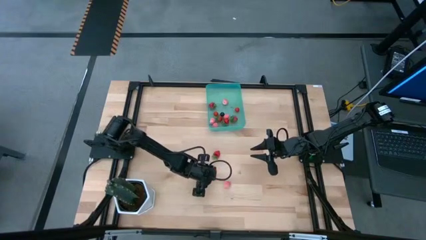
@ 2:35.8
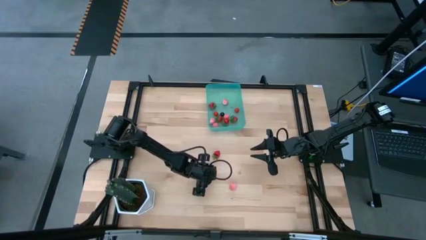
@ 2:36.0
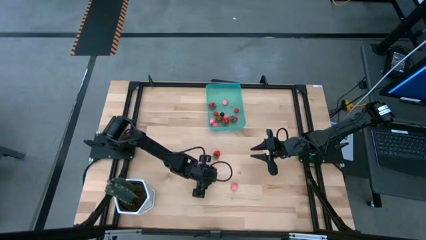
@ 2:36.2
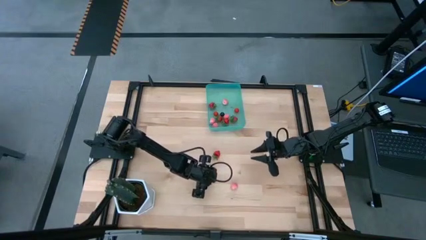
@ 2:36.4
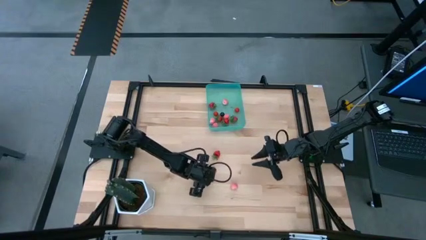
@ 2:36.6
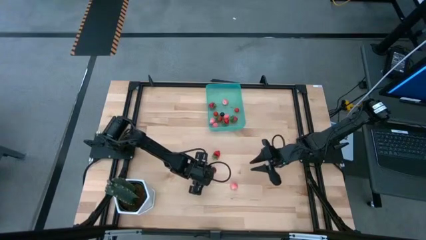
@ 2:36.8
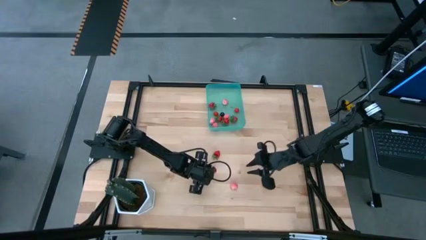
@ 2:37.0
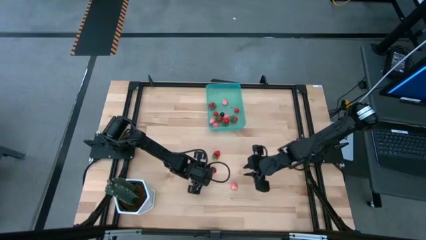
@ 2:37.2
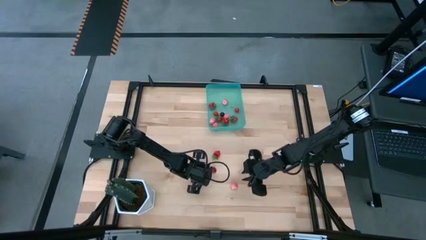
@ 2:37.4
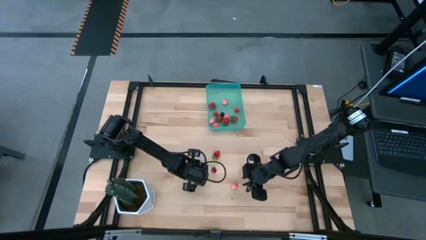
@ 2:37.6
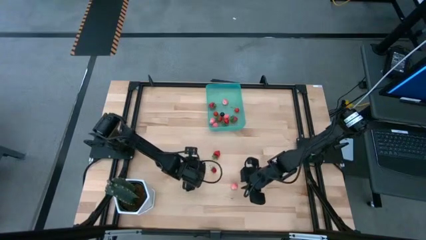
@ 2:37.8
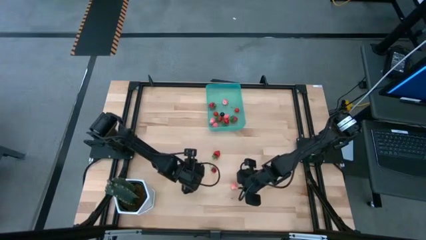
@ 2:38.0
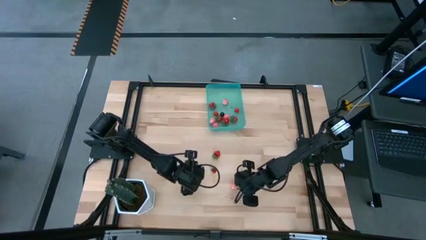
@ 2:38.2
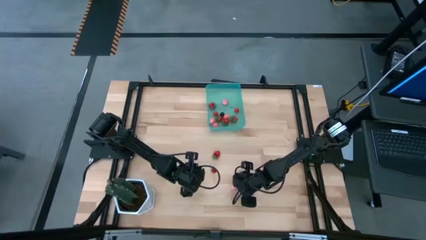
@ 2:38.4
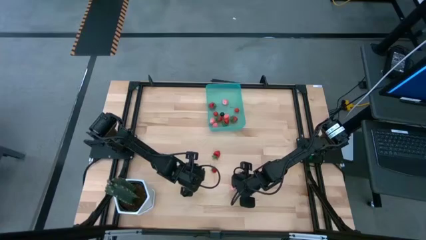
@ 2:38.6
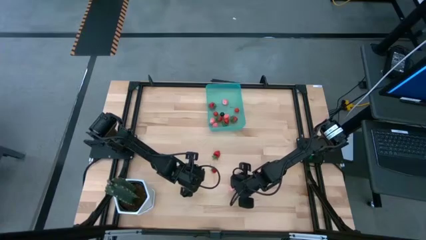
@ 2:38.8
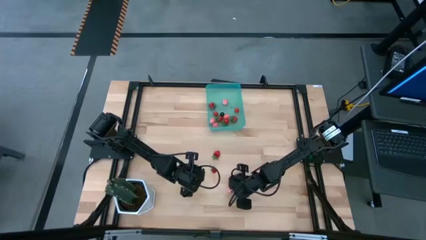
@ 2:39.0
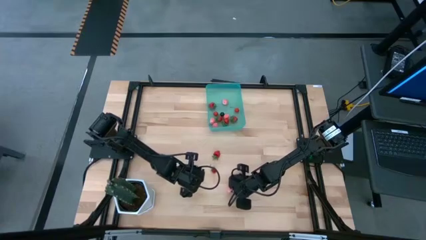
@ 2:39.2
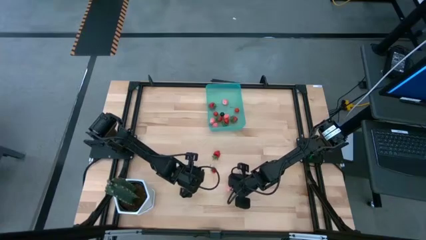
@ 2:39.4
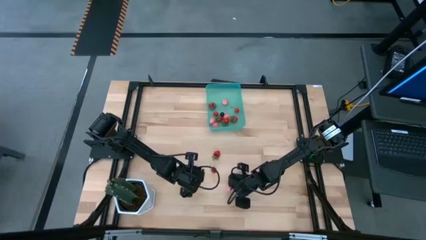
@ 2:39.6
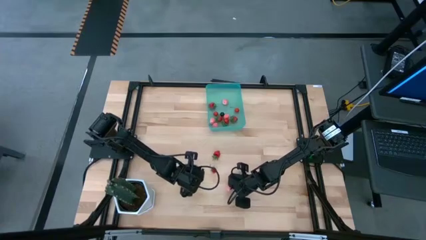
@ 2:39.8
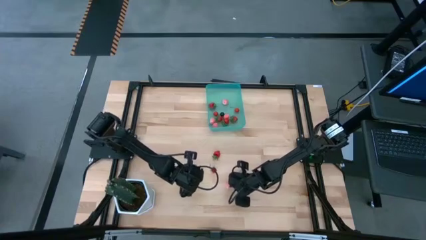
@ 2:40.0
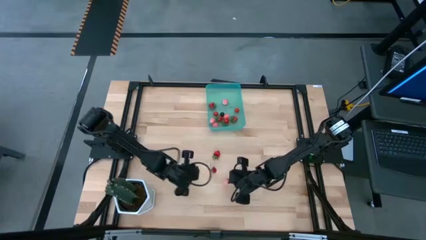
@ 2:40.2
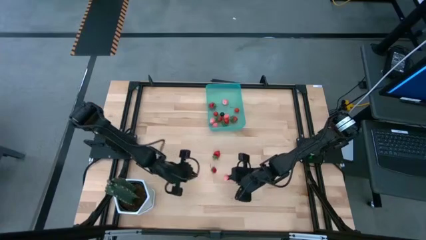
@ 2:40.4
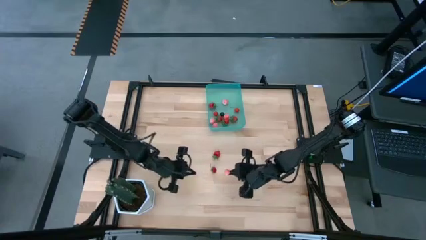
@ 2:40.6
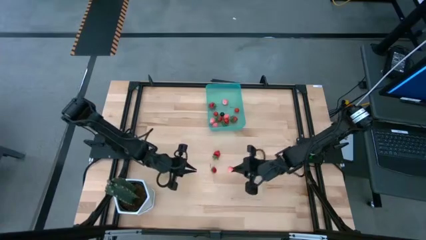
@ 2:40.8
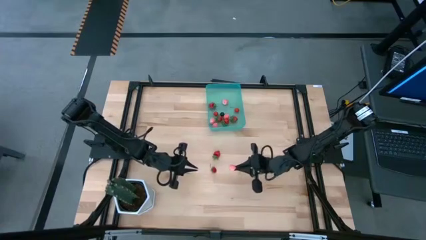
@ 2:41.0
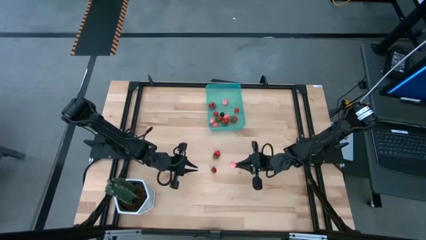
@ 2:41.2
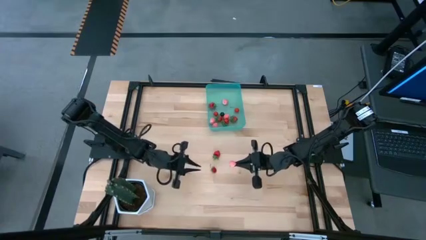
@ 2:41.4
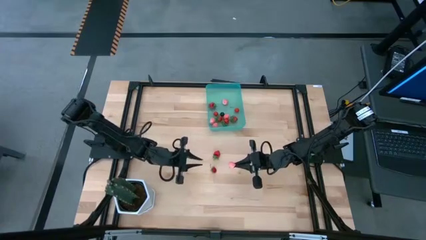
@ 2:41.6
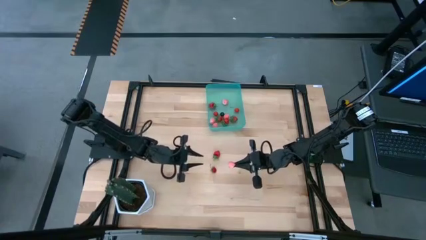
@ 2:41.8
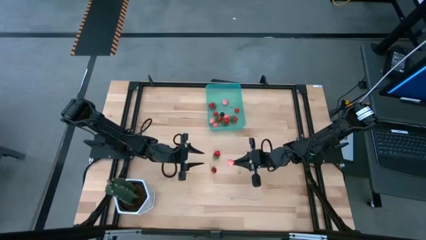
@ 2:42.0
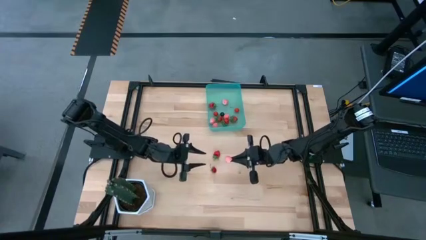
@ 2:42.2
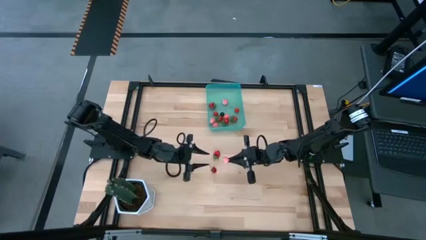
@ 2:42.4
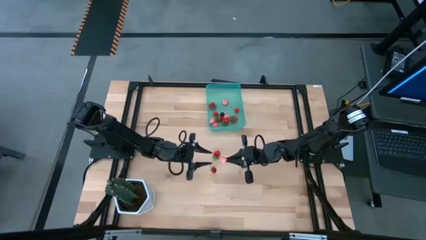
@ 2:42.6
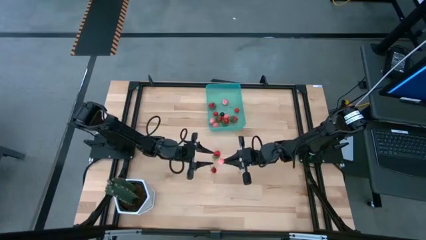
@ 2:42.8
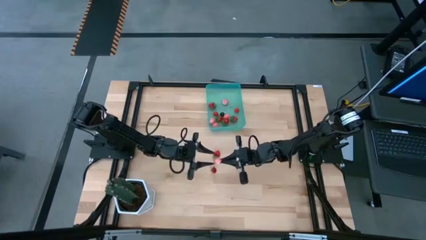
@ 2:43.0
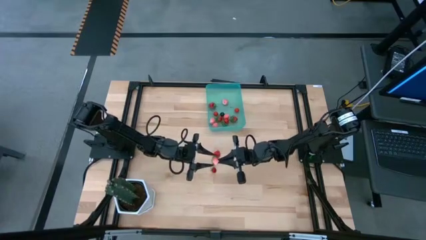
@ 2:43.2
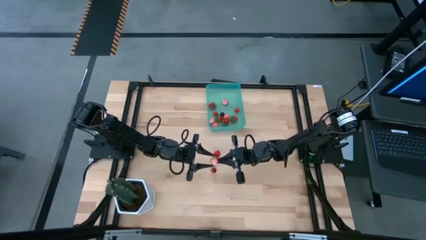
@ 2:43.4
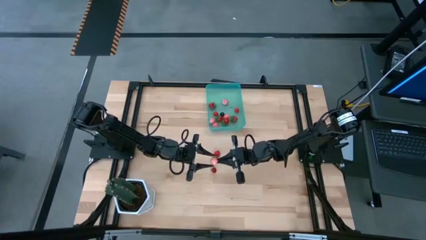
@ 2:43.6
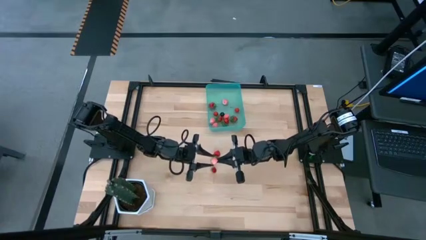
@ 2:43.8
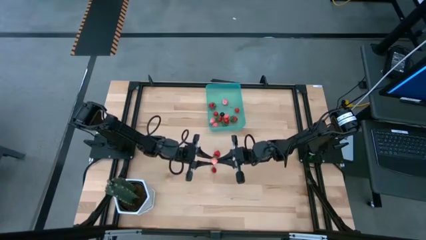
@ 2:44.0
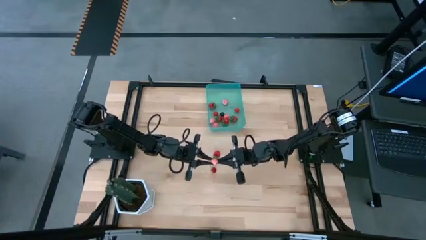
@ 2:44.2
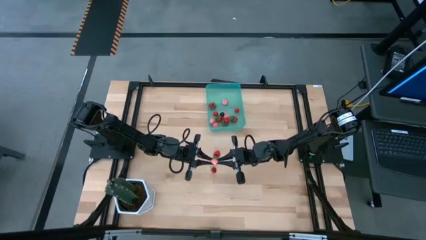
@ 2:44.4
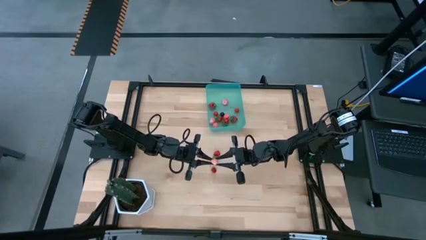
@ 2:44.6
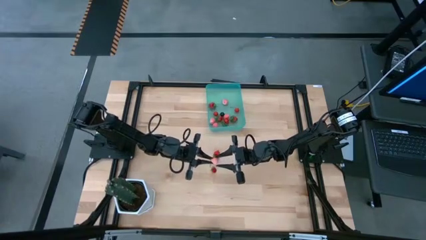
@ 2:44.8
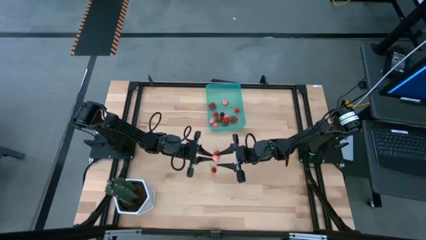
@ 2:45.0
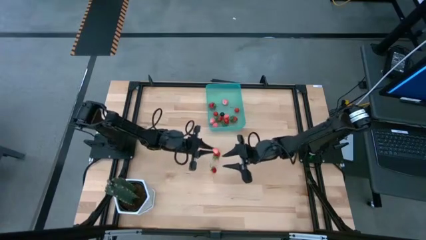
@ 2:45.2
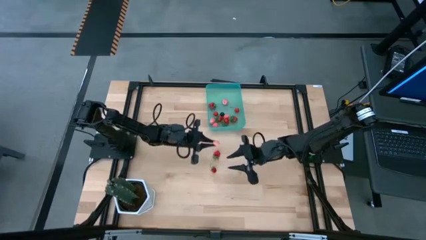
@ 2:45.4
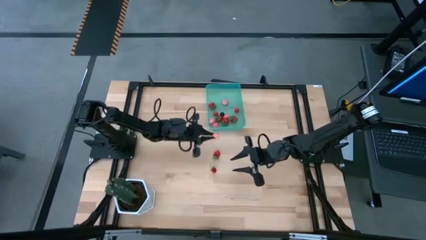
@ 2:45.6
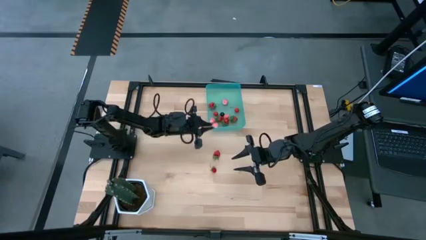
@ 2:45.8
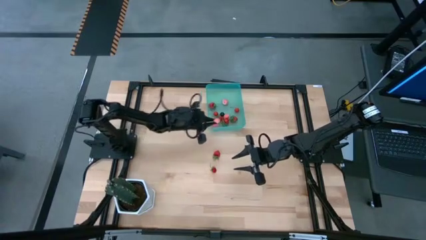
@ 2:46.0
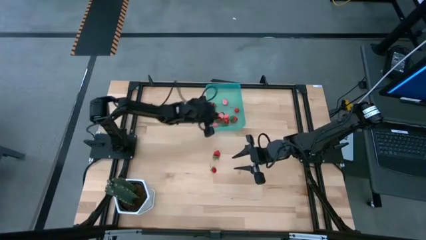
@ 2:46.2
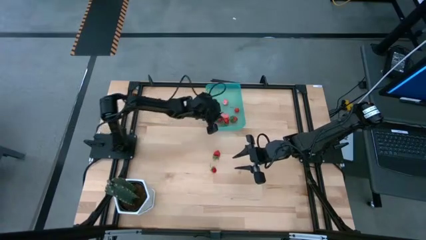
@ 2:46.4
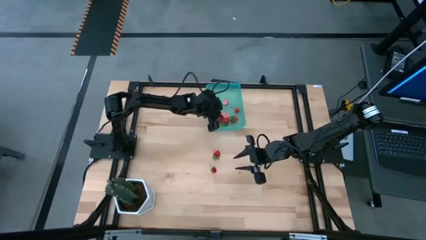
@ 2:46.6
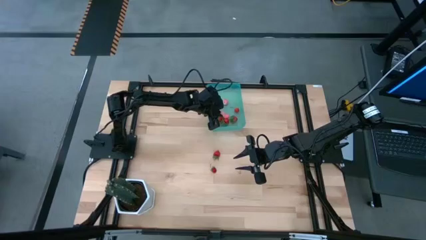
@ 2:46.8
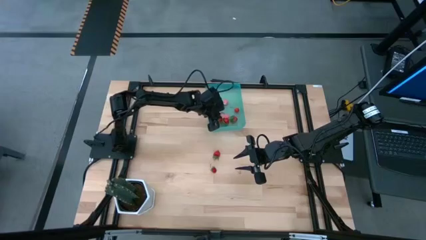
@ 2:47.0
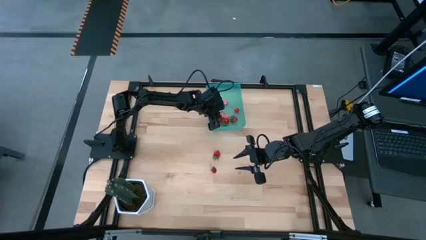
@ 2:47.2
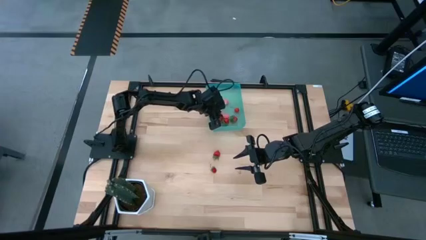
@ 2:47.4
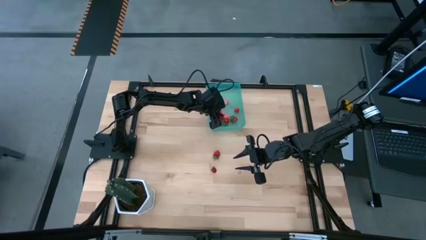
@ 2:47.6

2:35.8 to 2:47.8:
Task: Pick and placing Produce into tupperware
Put the pink peach into the blue bin

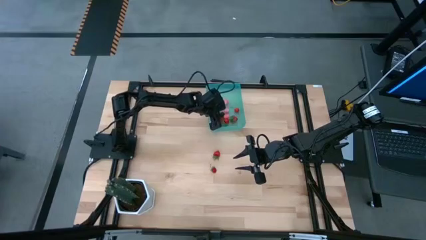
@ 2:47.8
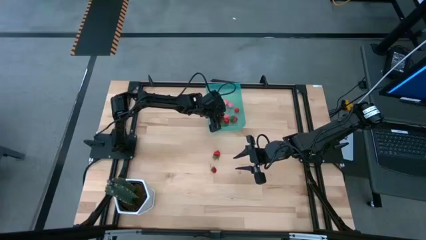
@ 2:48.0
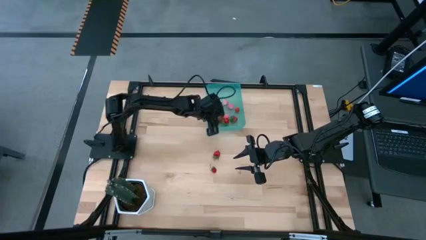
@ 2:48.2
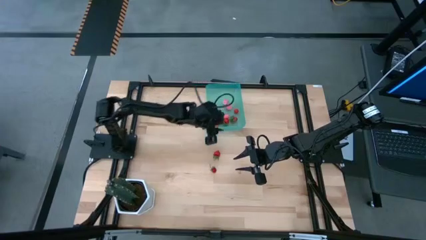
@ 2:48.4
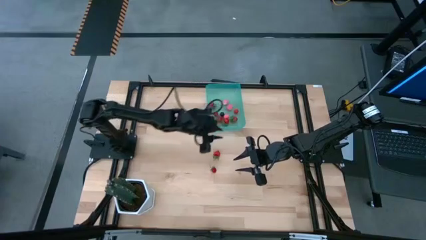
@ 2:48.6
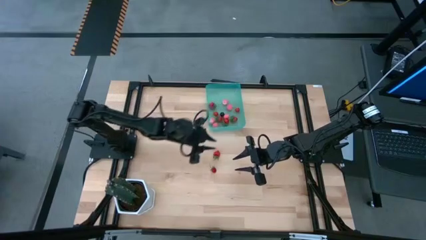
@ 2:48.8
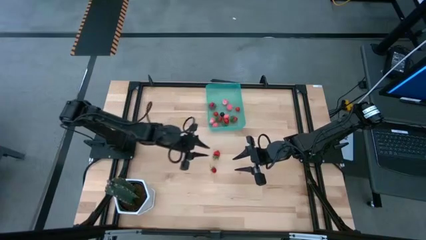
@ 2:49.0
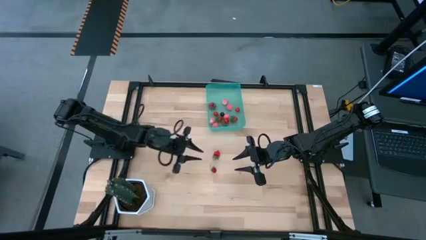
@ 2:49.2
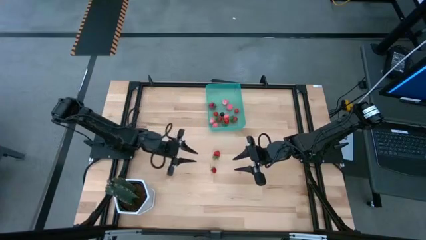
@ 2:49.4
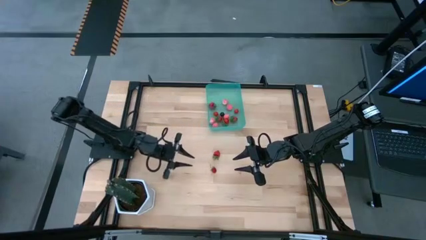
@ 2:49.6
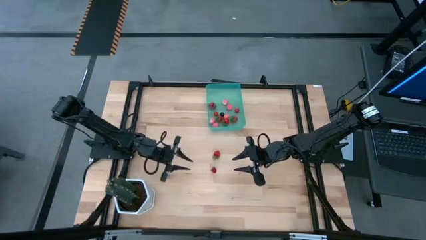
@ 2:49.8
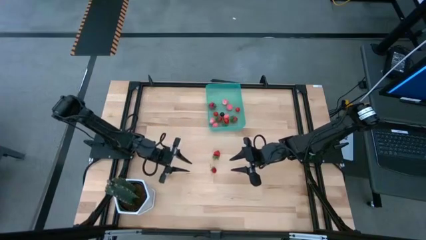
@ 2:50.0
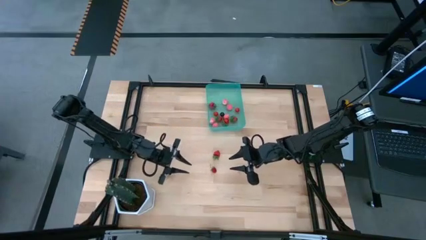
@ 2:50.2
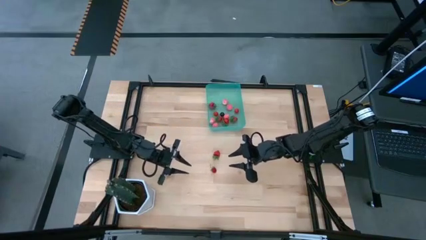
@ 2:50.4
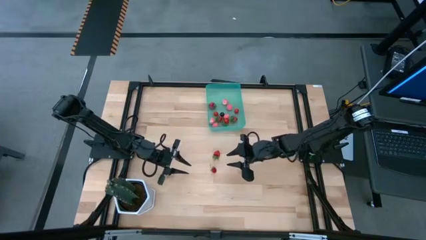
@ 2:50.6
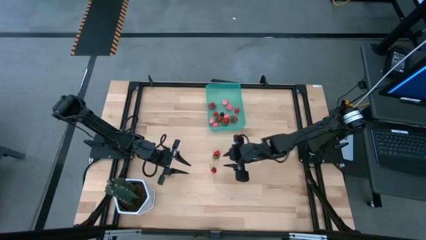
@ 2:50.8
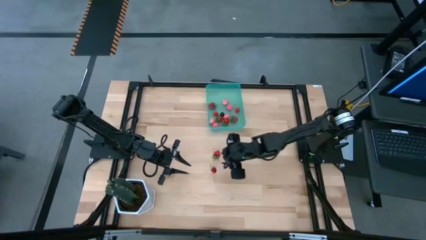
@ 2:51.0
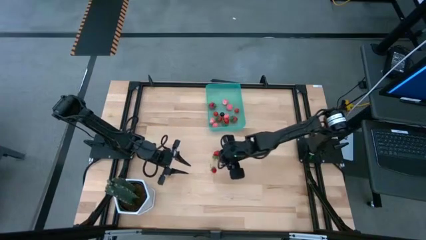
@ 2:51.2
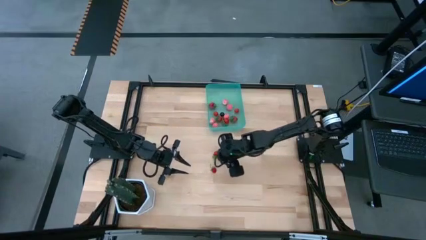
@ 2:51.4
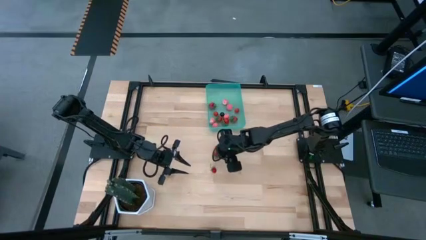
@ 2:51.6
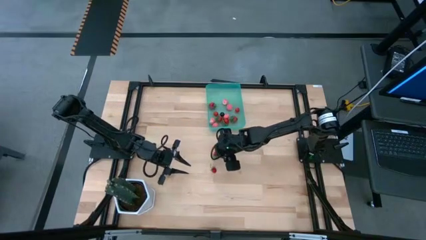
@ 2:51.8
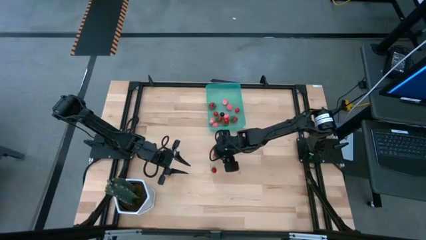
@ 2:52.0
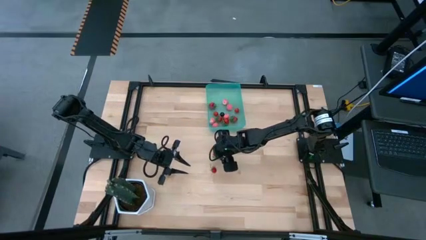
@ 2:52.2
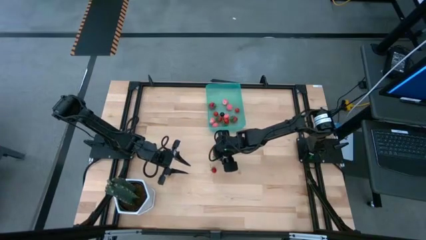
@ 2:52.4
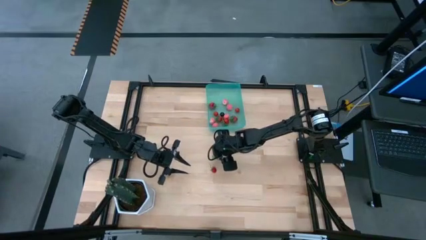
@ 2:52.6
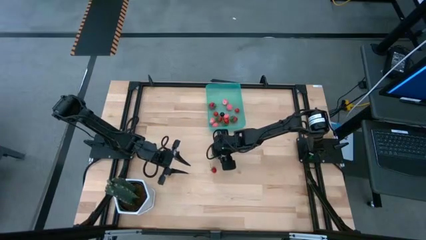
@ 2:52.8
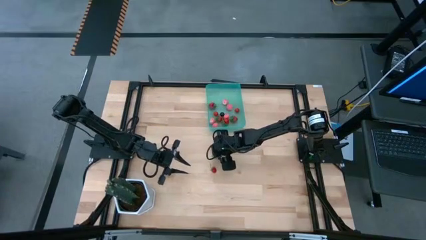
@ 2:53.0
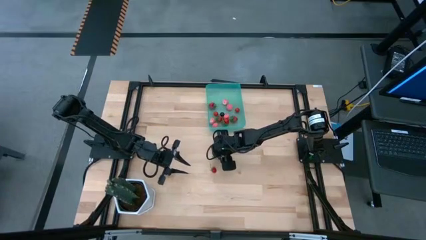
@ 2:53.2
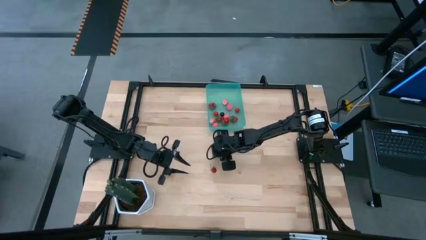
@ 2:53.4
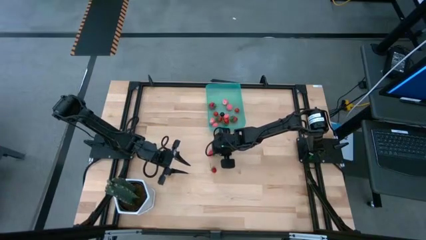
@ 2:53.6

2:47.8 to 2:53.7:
Put the red strawberry into the blue bin
